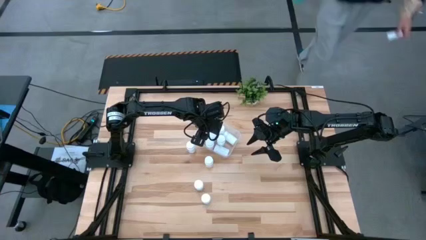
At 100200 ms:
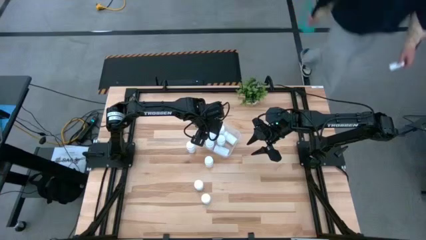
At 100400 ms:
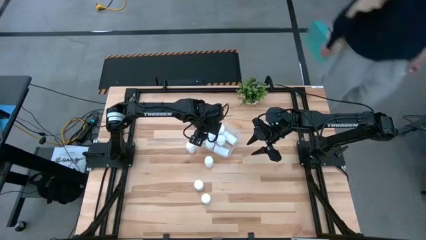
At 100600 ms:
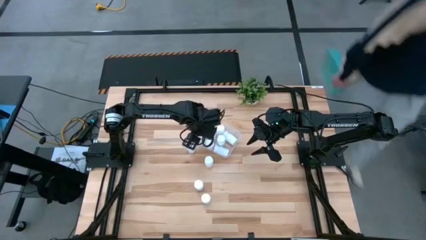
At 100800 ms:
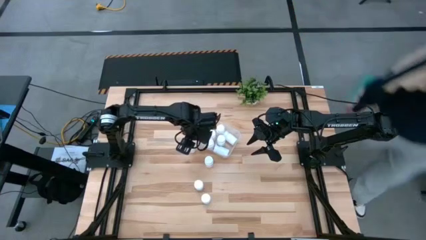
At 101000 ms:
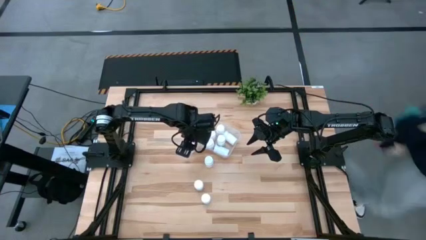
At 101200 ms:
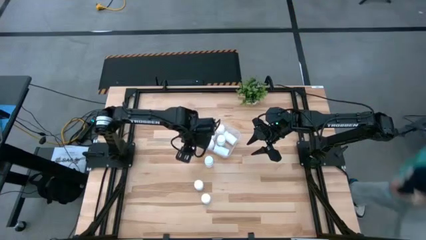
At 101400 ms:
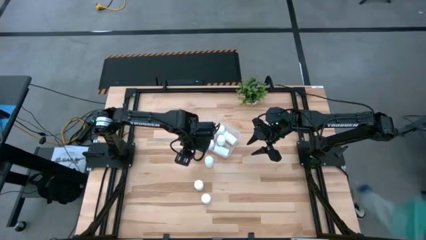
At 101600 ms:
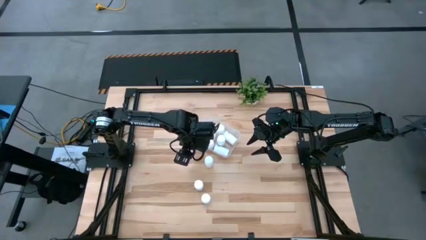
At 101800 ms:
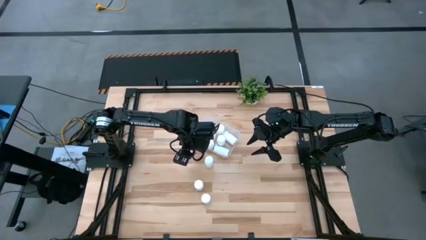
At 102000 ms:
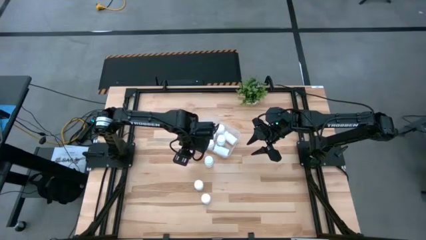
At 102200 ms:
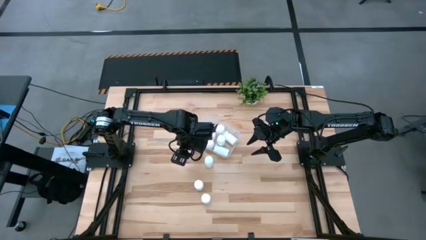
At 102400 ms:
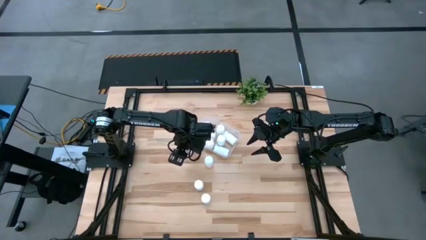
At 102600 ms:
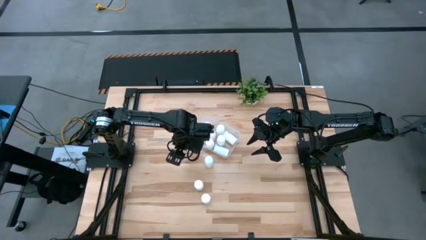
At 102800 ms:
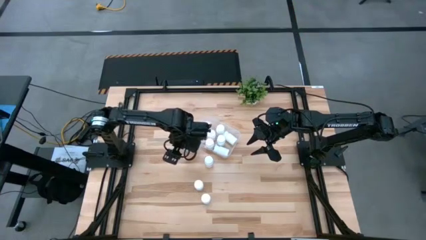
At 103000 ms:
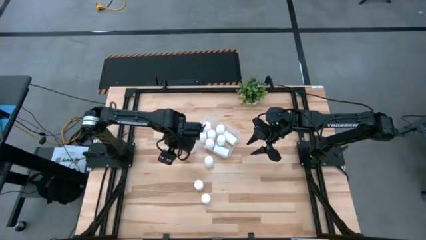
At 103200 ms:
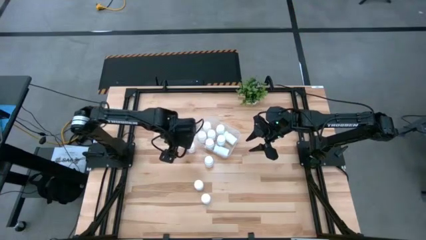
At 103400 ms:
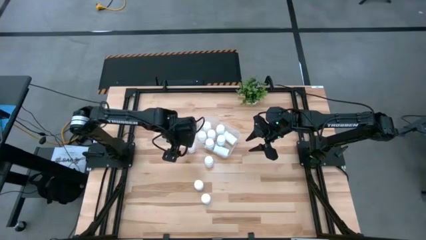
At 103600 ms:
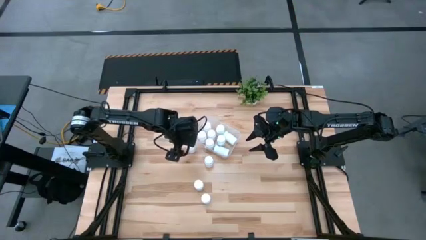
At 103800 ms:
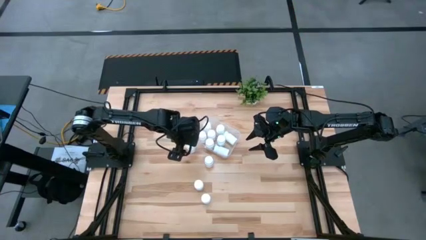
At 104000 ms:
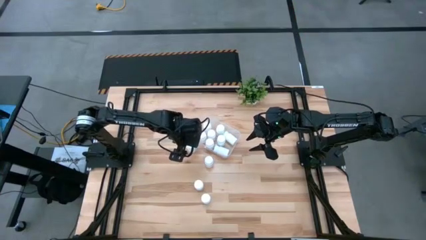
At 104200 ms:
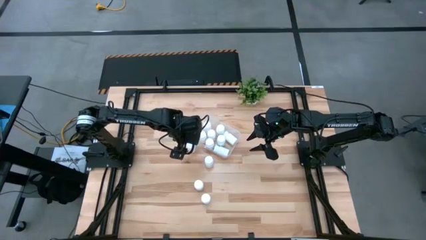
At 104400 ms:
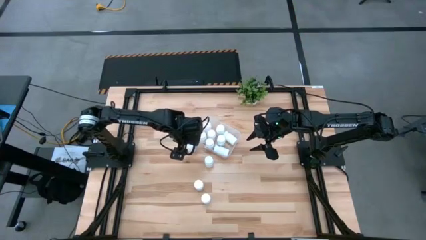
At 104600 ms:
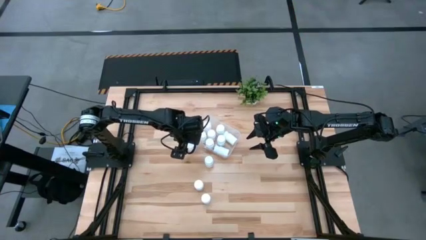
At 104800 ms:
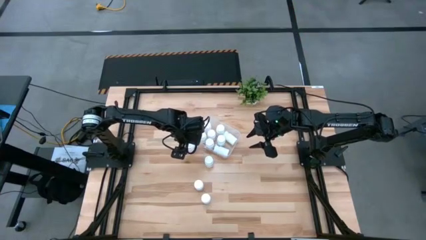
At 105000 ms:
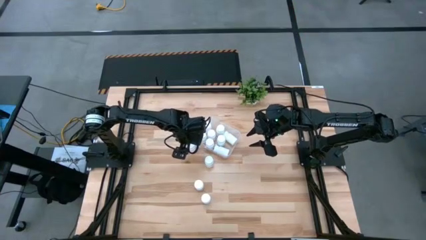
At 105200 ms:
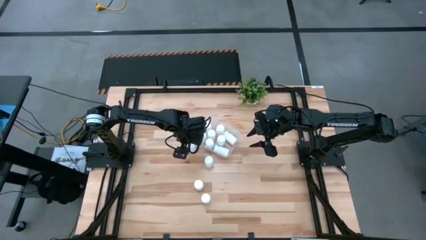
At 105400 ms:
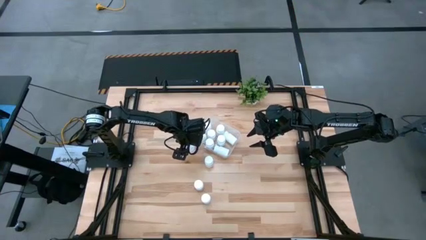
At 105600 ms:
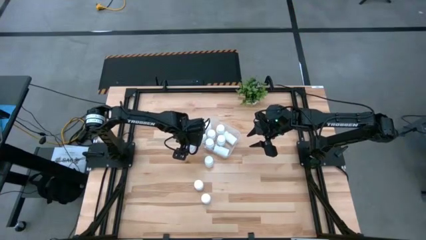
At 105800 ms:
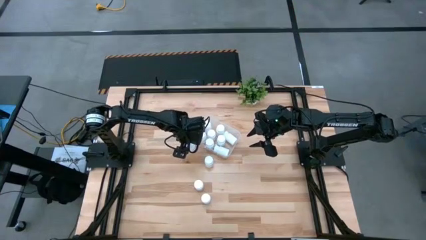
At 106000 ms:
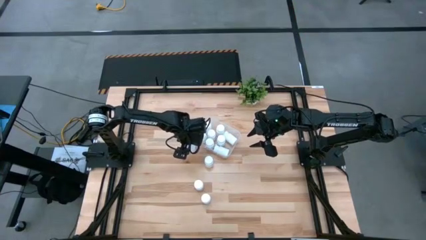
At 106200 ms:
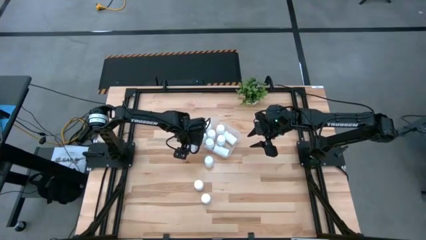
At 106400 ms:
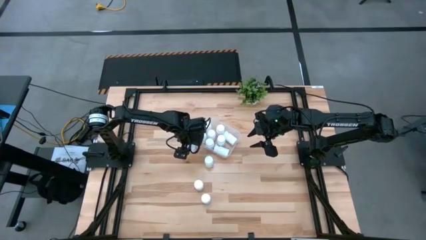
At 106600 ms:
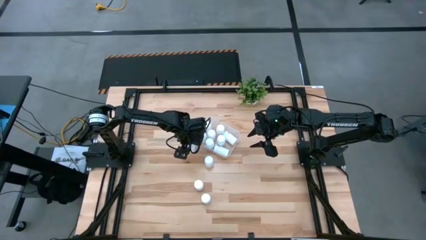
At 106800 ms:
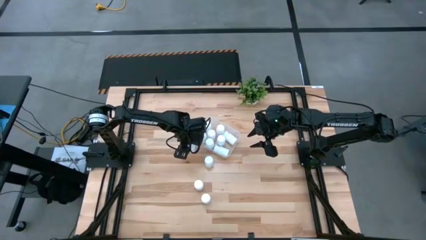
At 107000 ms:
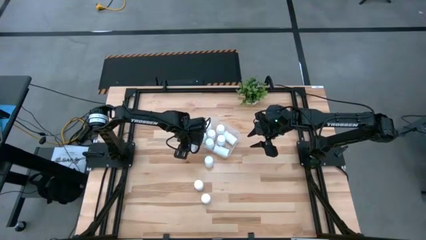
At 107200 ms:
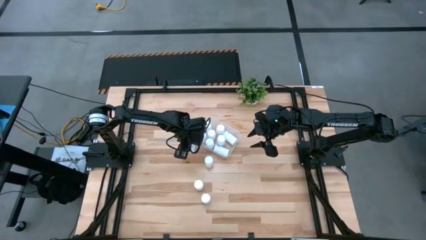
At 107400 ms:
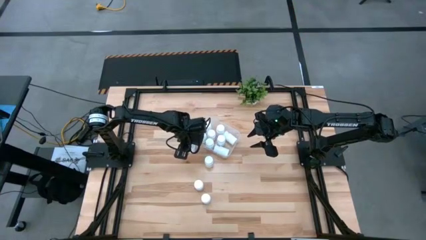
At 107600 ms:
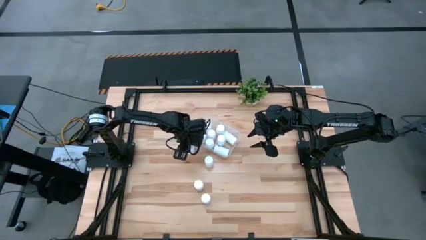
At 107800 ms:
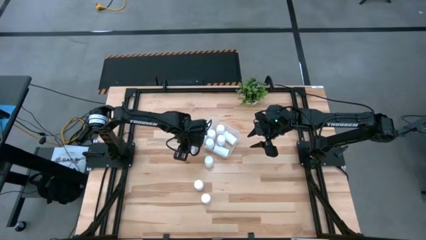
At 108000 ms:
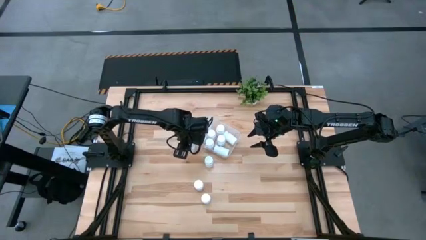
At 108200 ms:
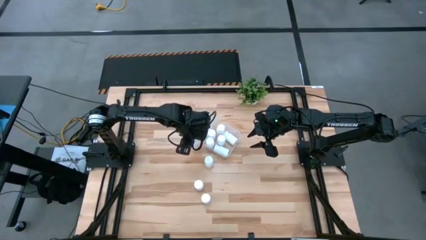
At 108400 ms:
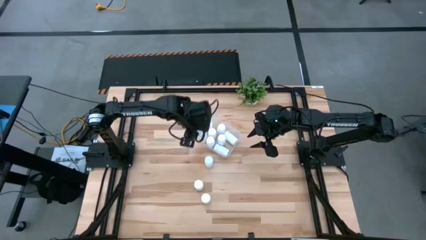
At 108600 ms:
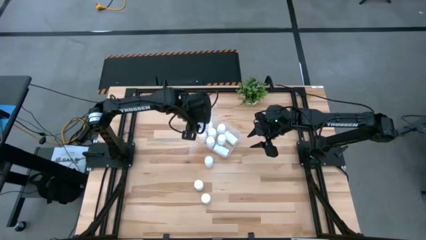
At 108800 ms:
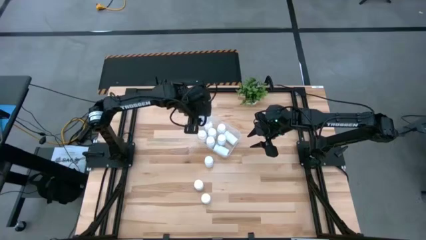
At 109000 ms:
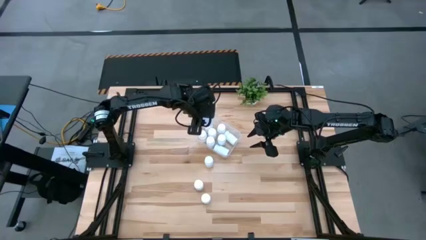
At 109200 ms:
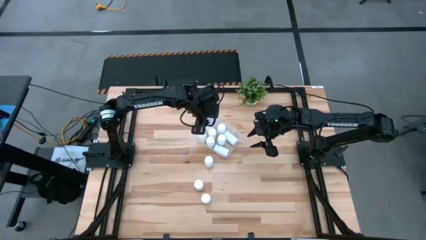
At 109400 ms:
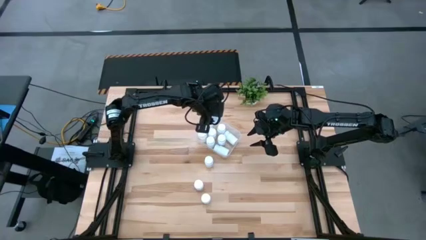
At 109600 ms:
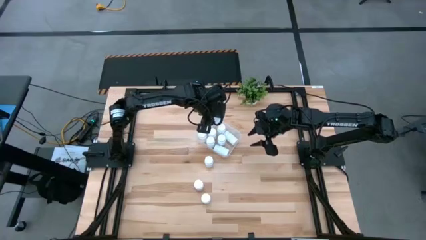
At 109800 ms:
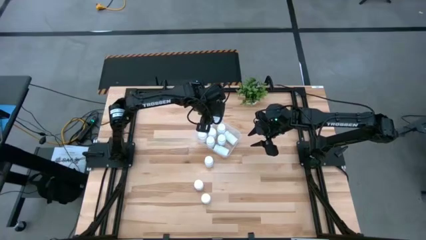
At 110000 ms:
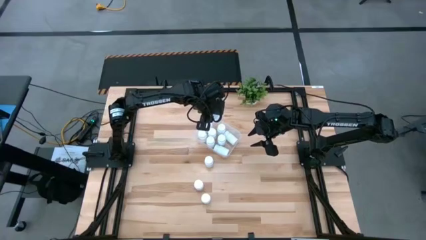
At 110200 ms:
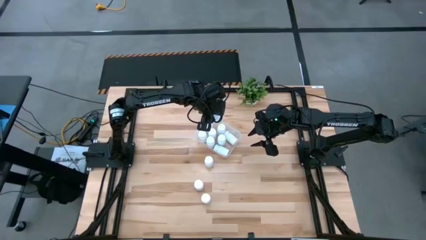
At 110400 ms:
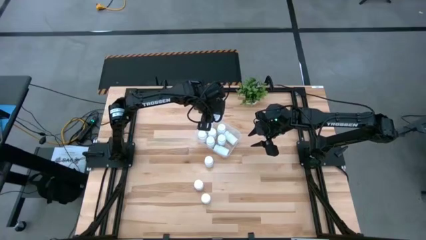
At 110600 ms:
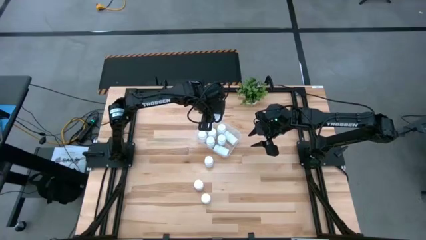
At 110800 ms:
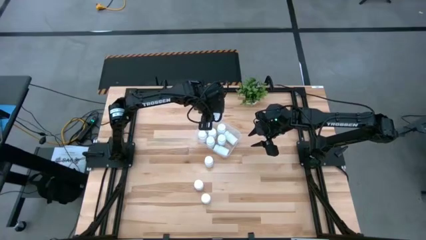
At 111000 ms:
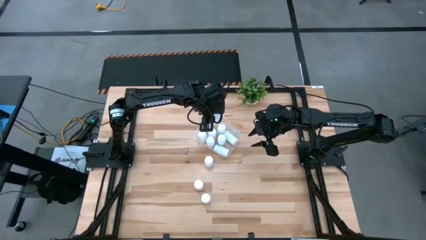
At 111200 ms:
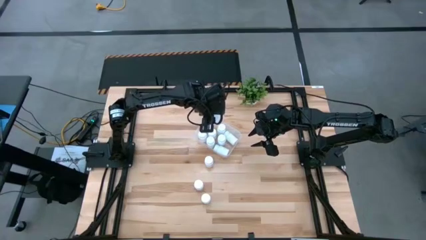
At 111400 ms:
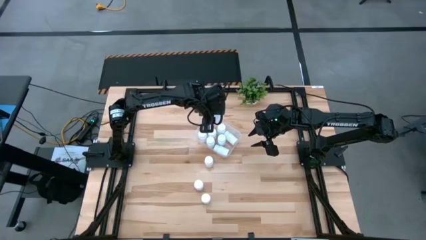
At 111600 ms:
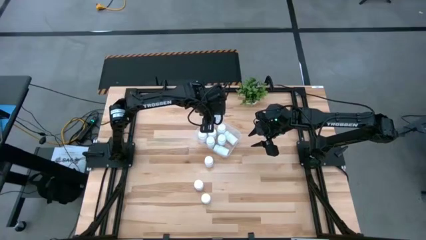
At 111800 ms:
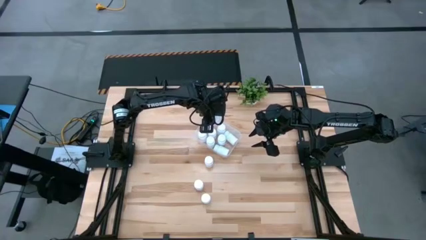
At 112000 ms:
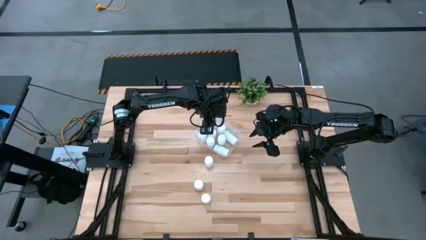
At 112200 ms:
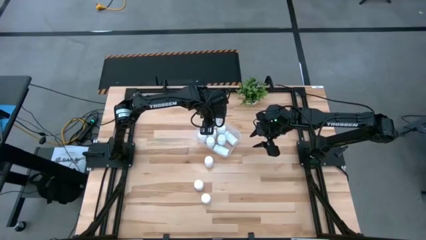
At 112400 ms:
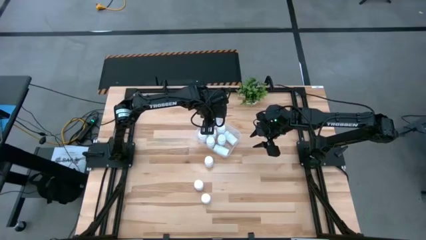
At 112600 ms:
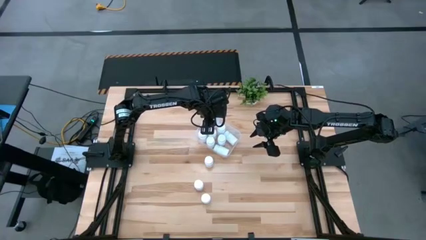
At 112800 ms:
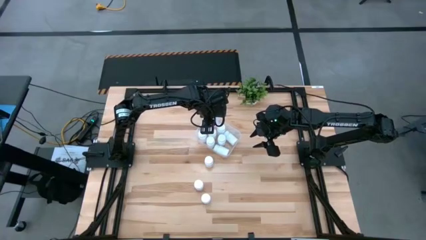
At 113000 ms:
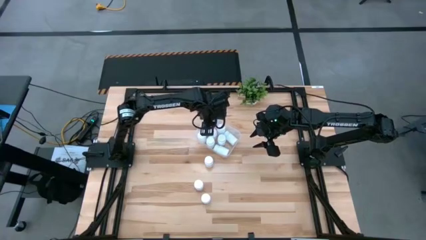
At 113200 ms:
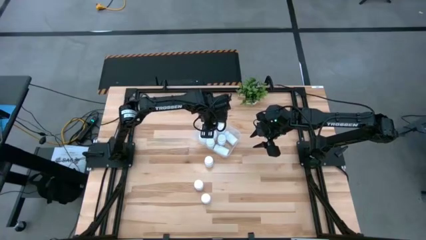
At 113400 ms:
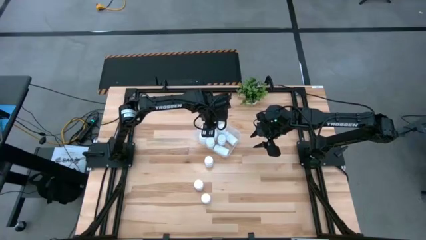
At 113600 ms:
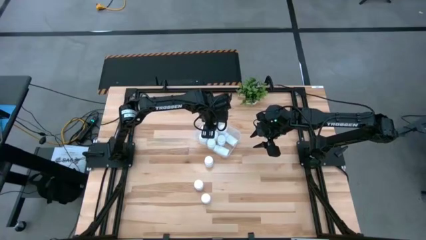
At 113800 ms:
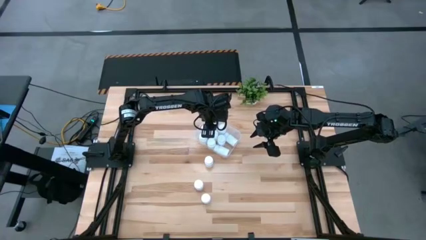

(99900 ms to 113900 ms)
Task: Pick and place pill bottles into a basket
Put the pill bottle into the bin

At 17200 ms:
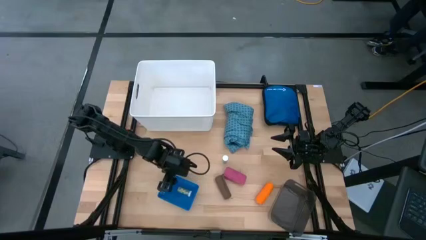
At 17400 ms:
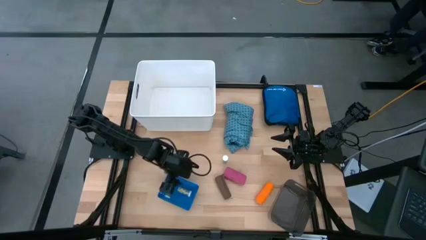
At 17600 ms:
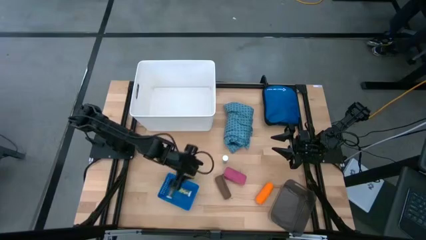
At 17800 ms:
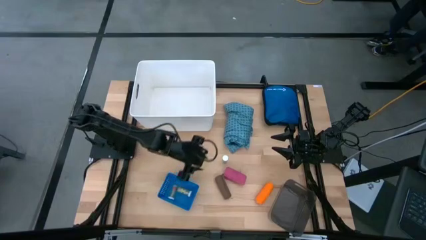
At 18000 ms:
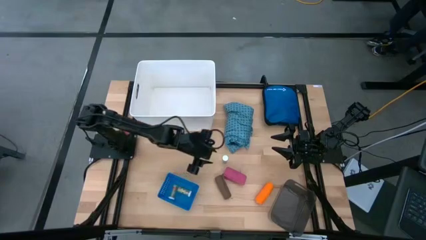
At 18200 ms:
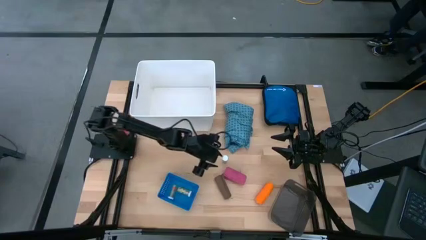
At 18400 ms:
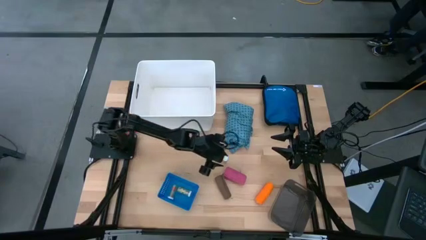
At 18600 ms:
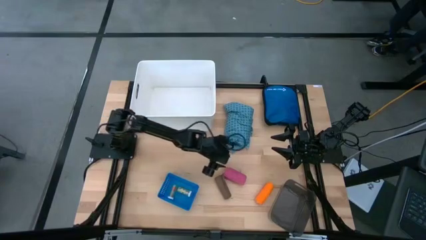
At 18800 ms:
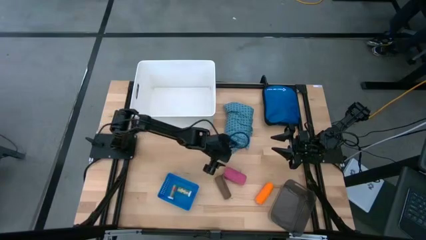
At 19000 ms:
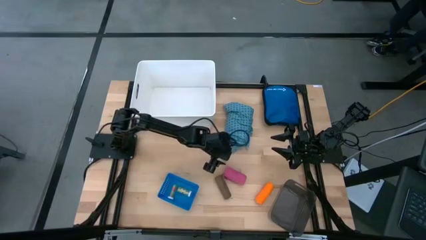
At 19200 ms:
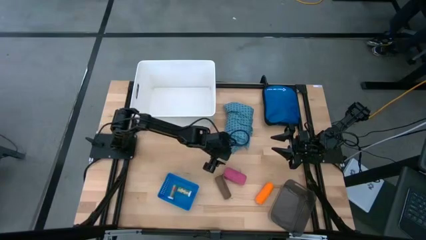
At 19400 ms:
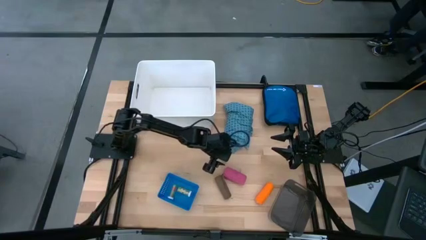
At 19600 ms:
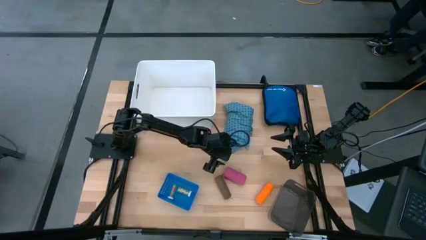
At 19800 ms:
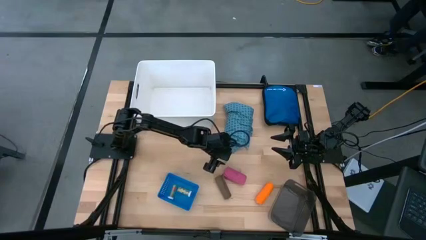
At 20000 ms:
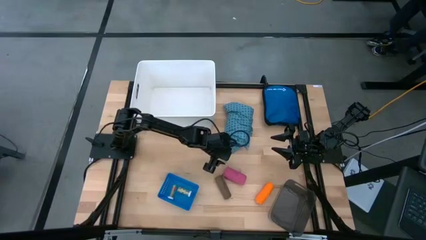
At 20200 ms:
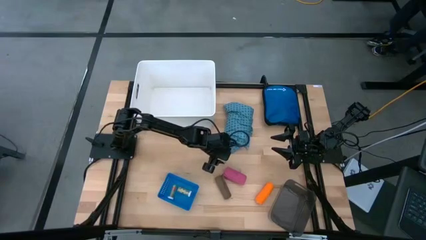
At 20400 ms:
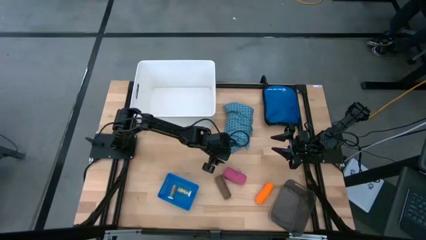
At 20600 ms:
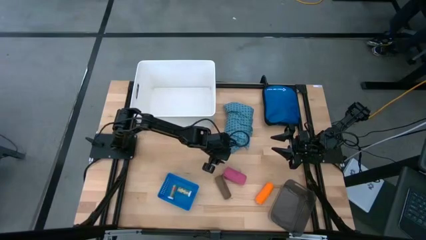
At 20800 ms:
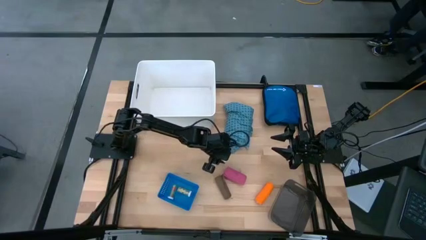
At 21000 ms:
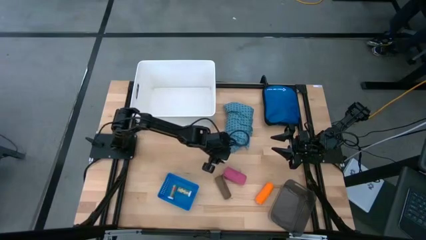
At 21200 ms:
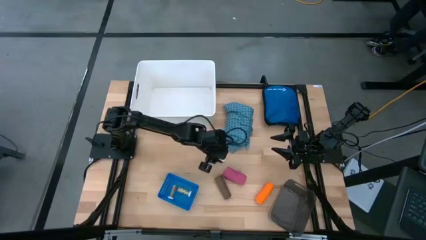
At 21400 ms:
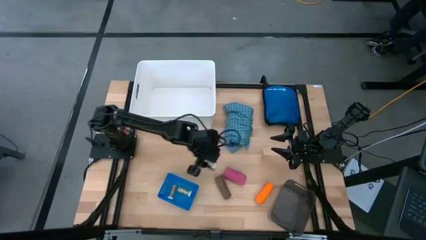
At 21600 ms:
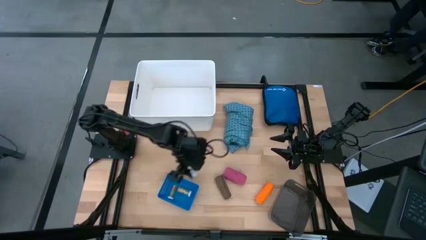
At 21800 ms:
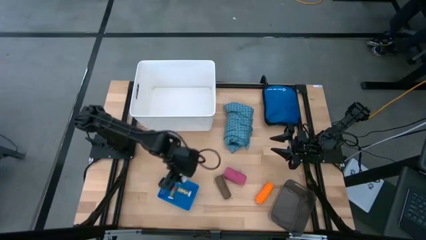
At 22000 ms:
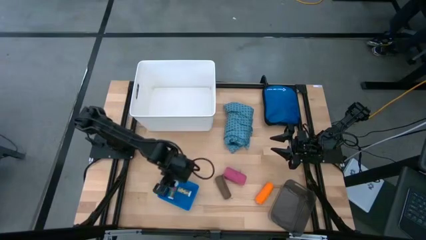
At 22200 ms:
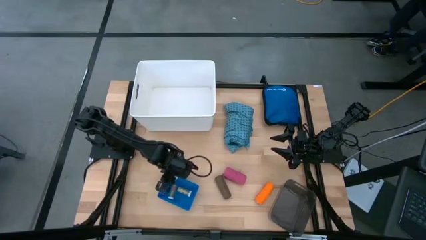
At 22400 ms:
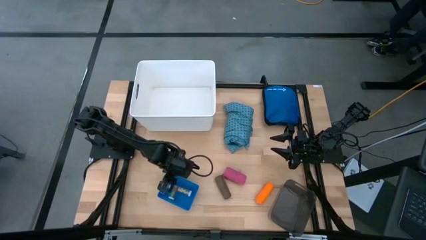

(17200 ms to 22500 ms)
Task: Pick & Place Medicine items
Put the blue medicine bottle into the blue bin
